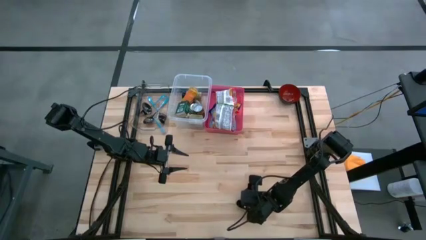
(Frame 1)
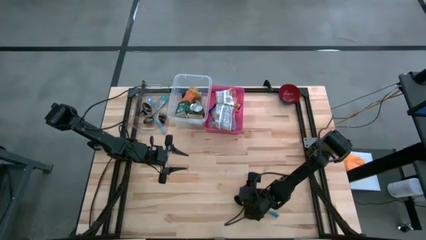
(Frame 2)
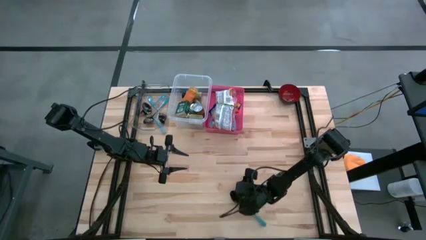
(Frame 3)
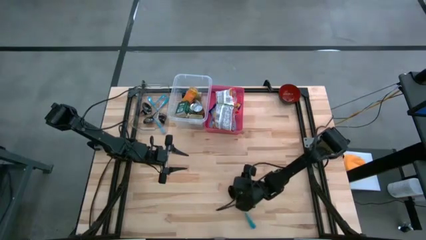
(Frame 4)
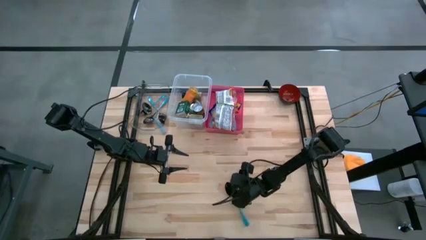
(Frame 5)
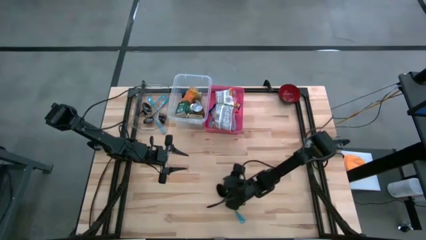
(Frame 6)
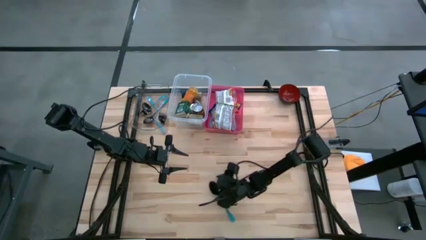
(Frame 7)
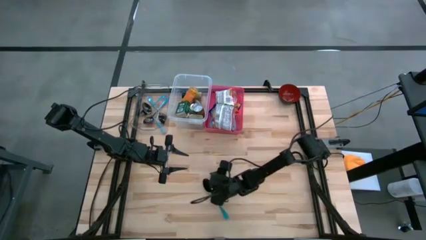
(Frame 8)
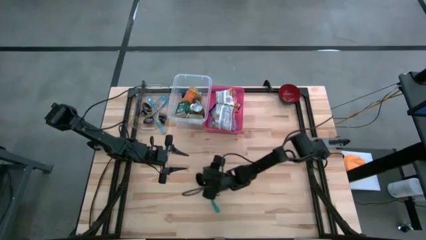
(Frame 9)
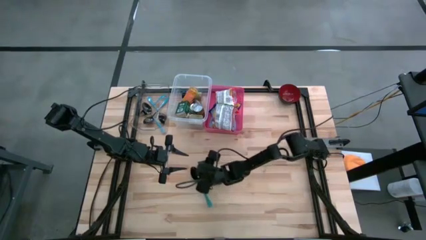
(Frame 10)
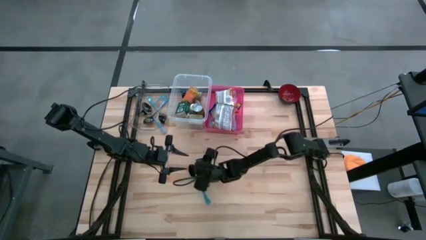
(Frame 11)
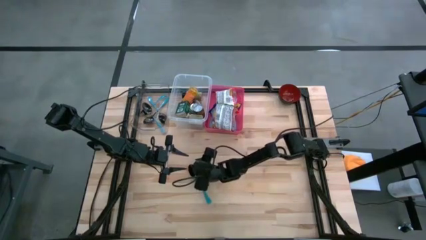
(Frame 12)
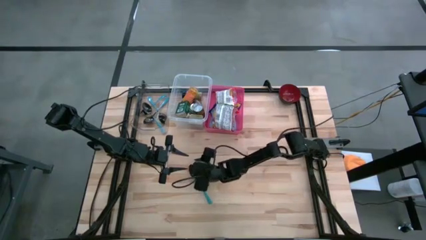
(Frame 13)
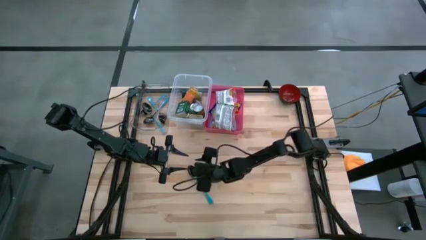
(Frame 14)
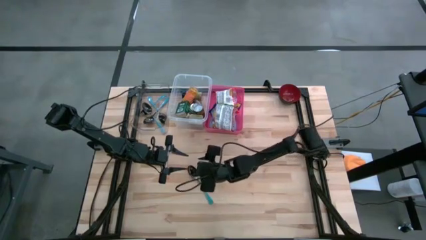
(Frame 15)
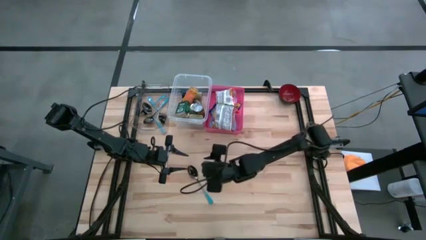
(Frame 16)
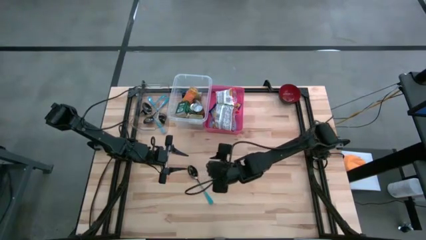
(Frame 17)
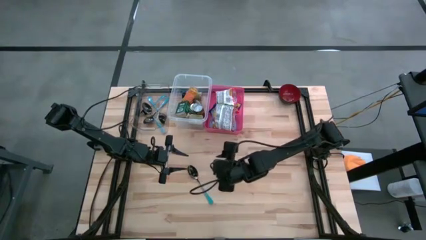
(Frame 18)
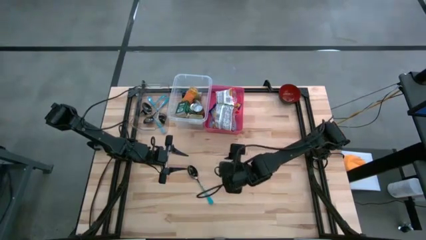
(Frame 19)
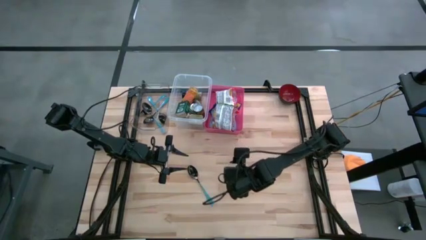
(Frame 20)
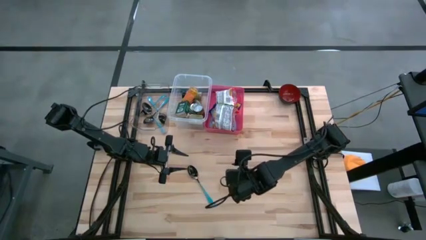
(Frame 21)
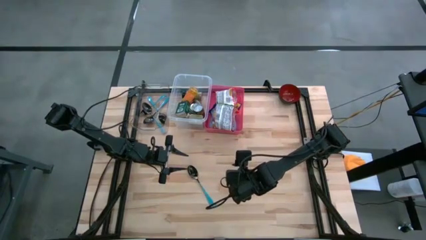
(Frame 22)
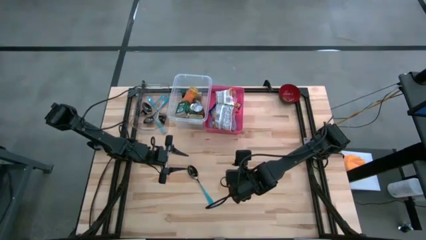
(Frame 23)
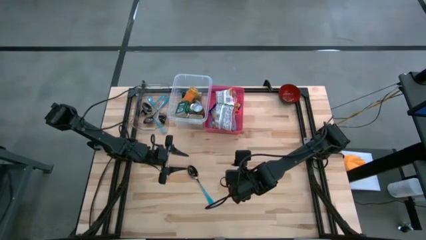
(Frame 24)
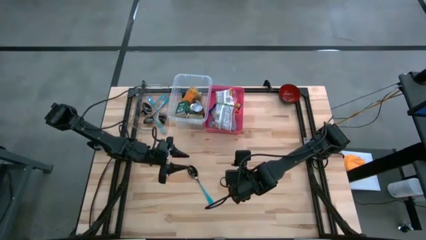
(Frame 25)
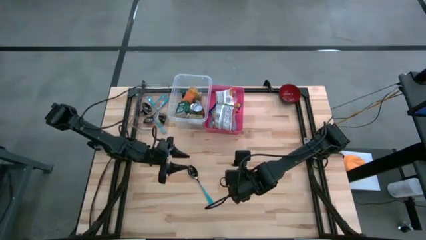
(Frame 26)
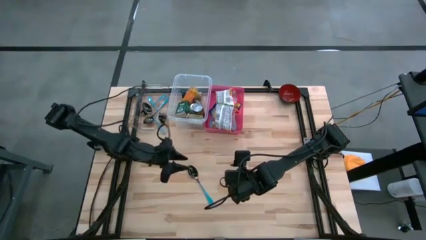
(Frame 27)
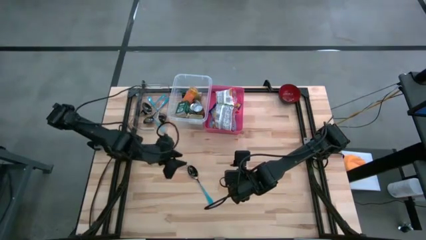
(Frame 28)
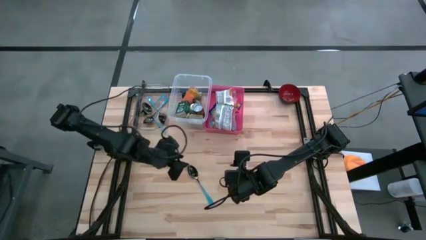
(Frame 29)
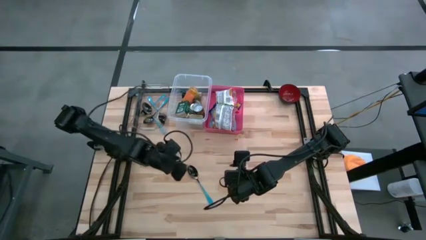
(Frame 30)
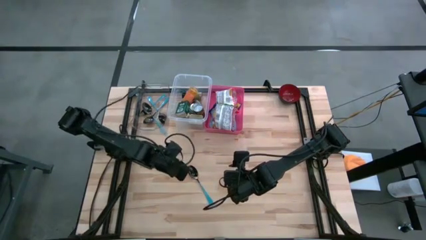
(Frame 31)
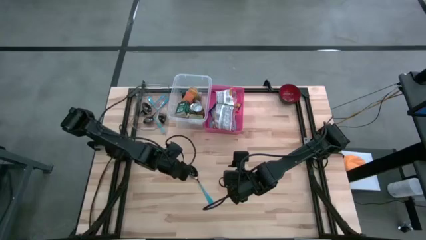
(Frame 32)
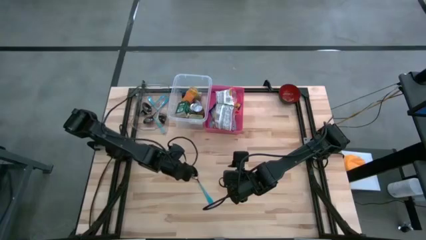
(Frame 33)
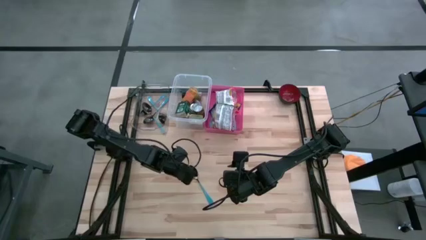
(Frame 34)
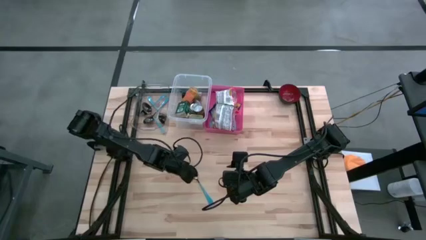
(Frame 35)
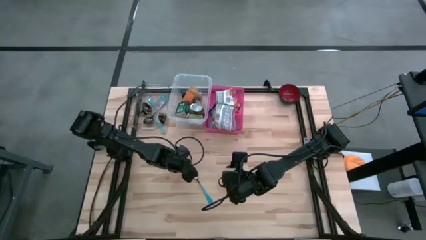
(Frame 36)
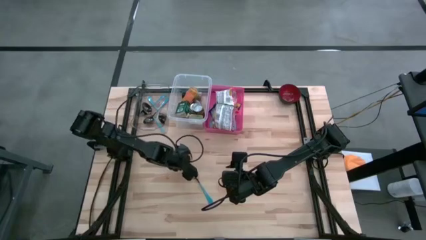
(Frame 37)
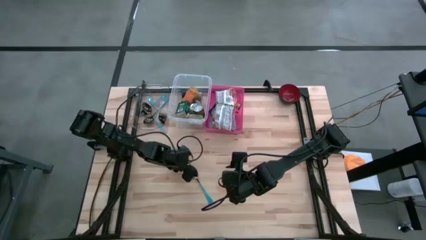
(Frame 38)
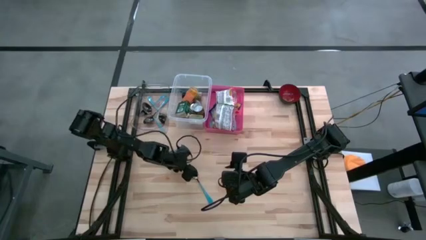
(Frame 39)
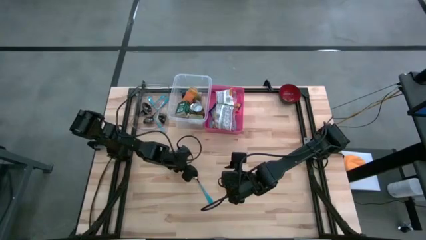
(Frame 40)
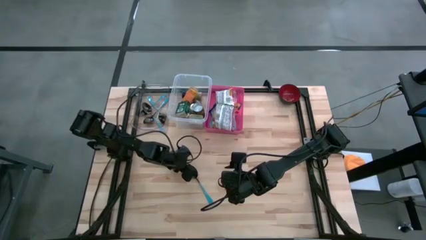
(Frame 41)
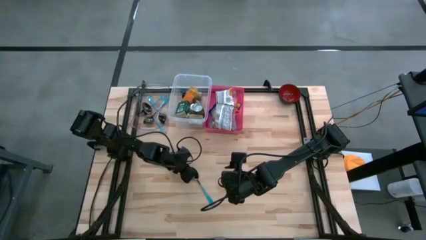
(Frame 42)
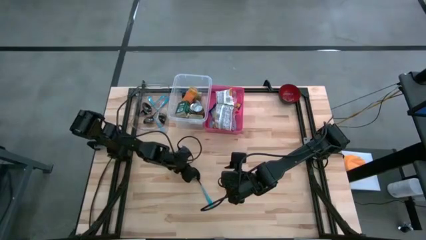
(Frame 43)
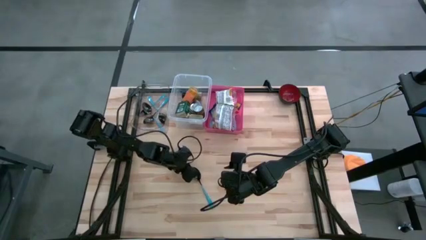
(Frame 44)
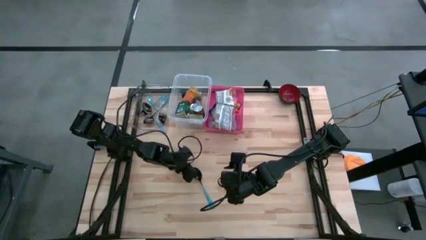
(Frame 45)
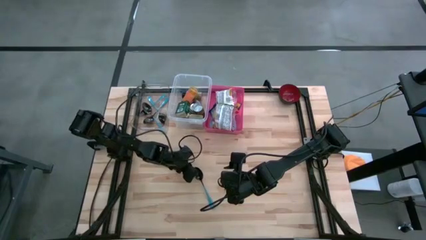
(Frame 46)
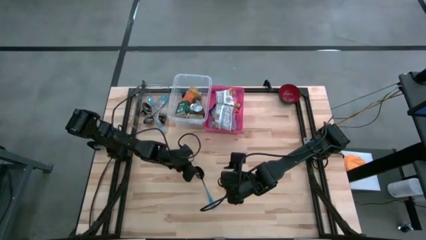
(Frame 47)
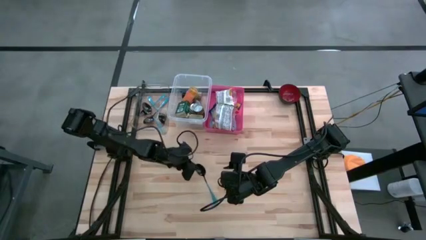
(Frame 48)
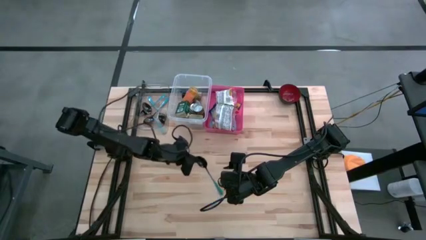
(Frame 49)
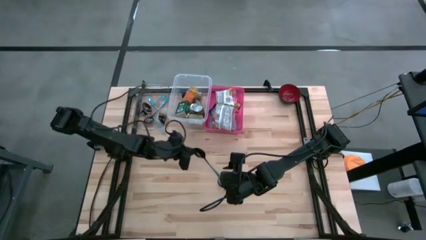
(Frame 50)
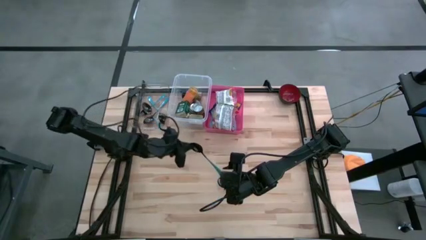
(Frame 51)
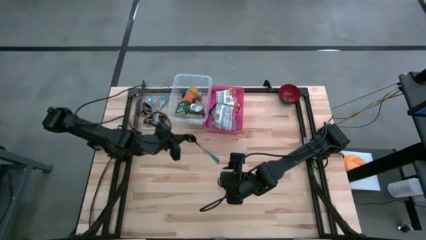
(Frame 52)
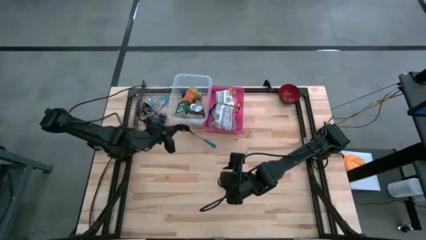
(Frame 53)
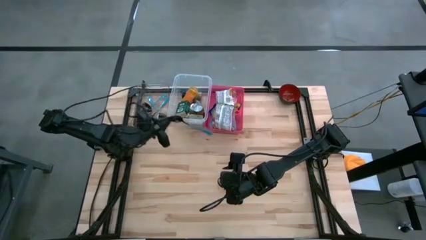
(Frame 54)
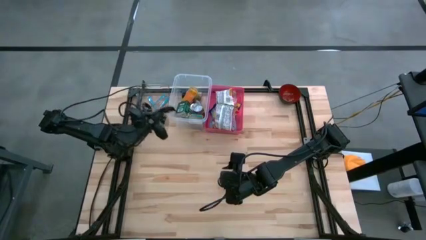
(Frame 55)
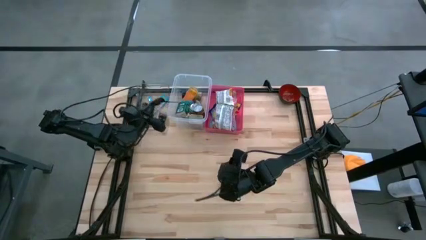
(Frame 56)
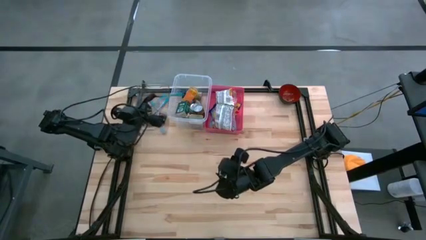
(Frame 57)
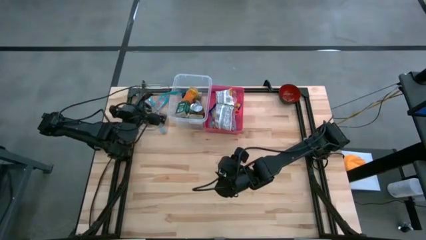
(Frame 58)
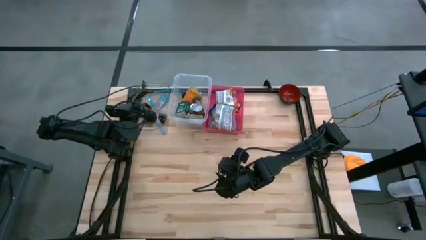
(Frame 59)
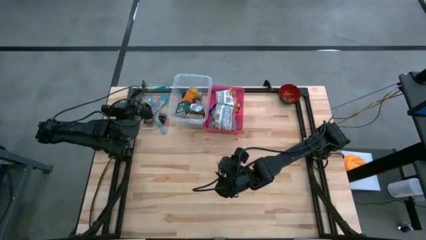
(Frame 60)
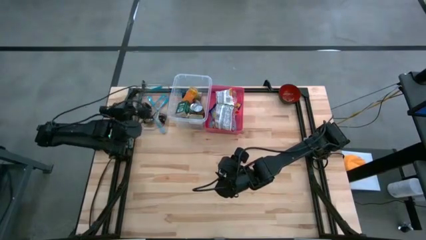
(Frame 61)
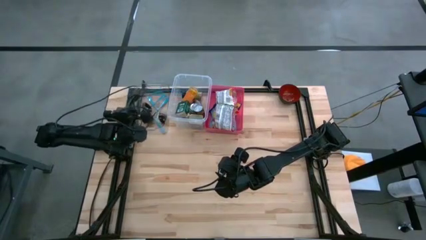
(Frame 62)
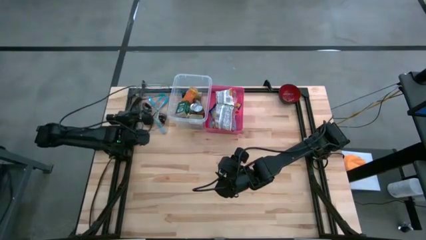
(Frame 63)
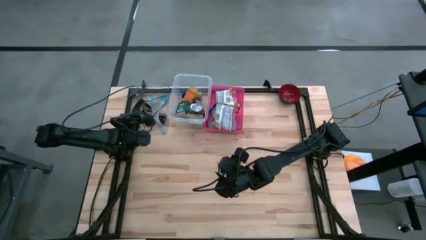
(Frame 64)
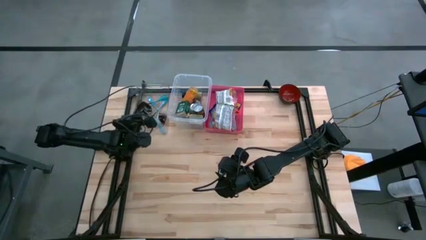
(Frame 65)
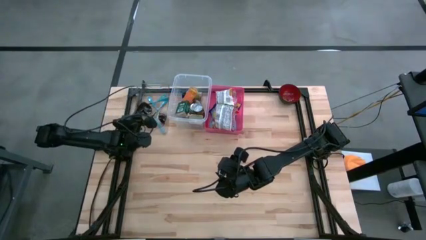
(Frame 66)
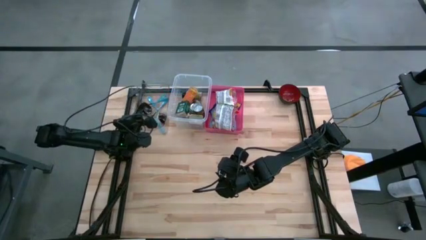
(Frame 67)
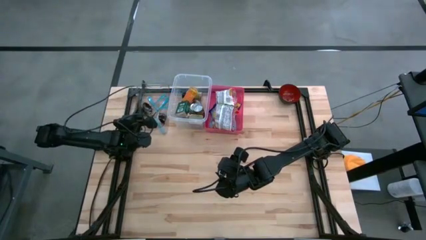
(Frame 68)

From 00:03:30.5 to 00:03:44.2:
Put the blue spoon into the left transparent bin
